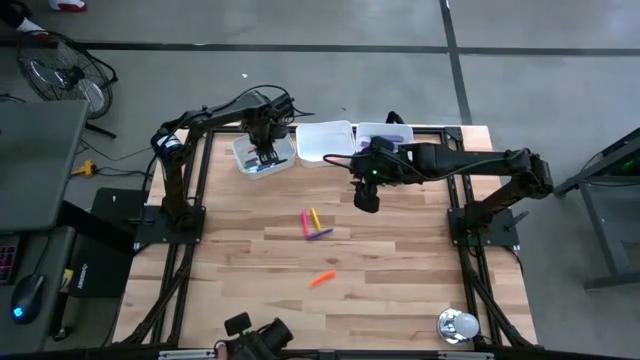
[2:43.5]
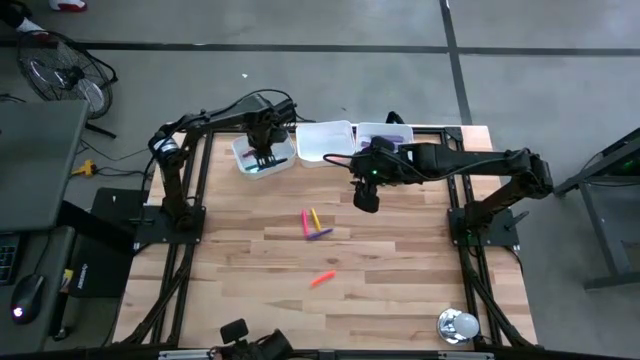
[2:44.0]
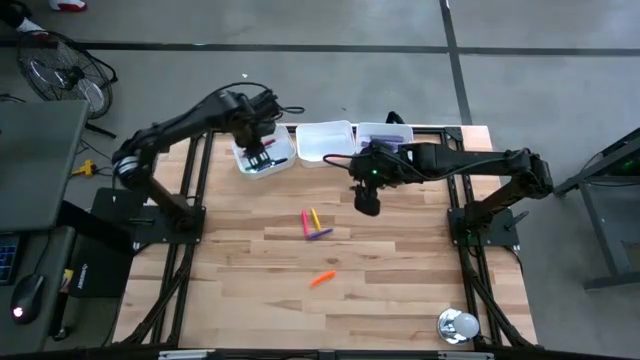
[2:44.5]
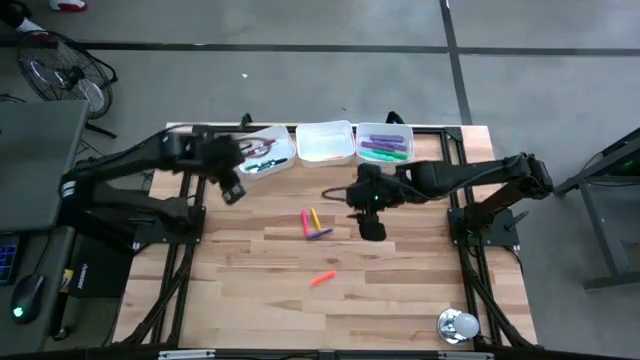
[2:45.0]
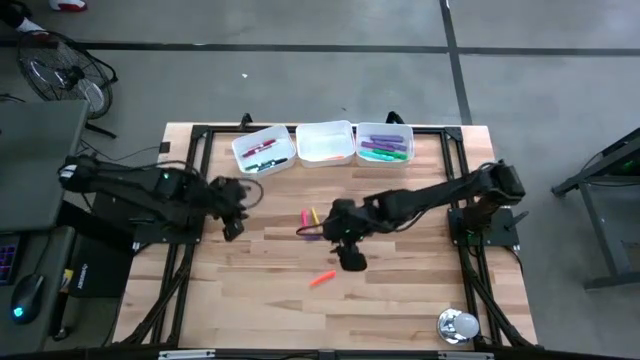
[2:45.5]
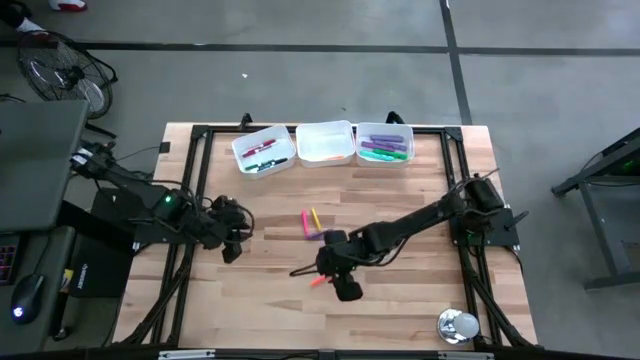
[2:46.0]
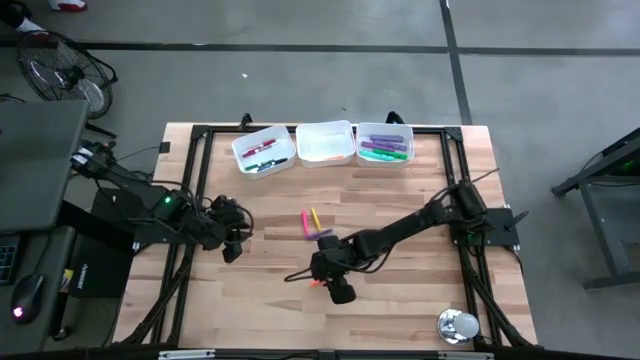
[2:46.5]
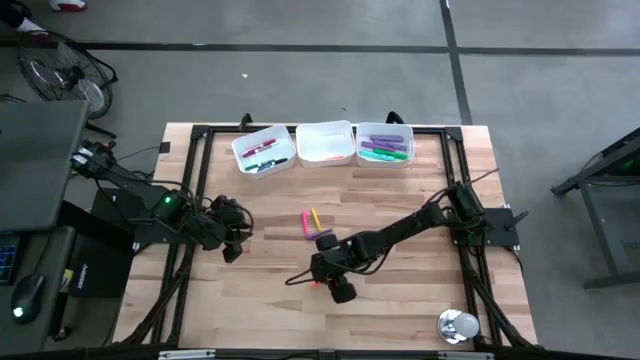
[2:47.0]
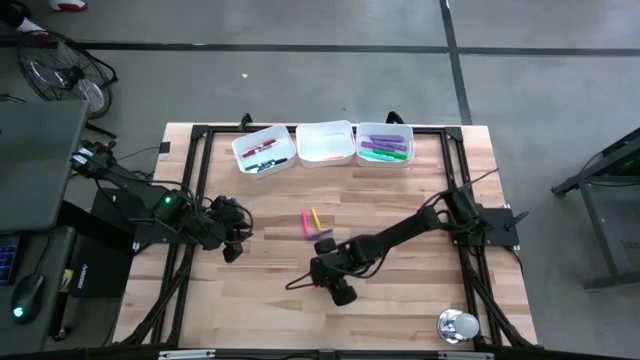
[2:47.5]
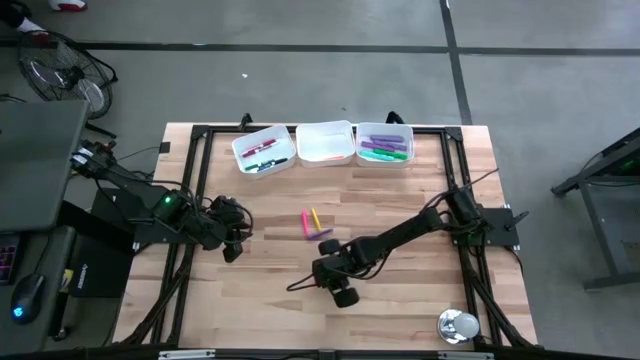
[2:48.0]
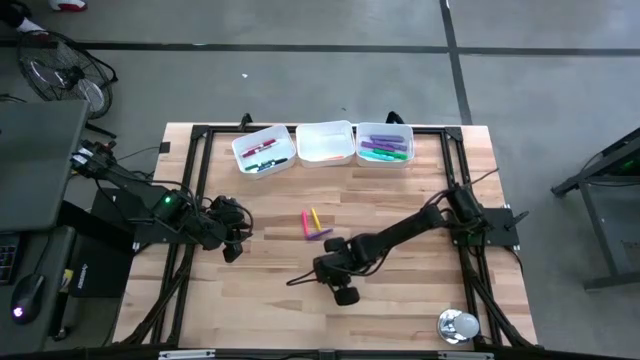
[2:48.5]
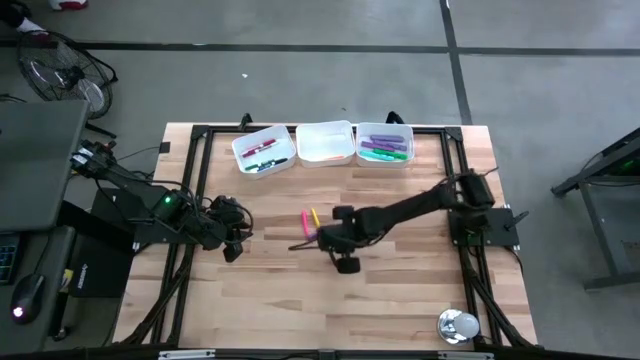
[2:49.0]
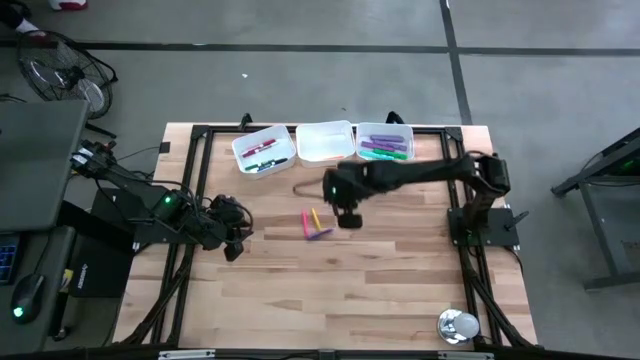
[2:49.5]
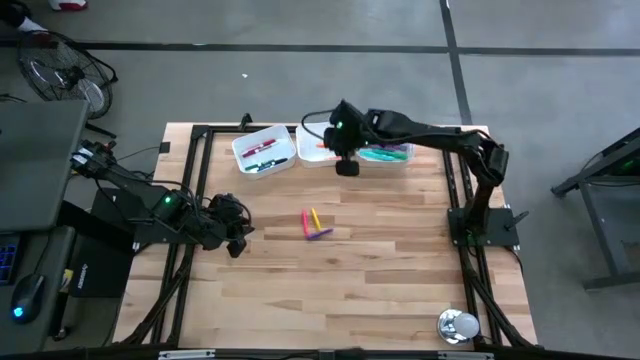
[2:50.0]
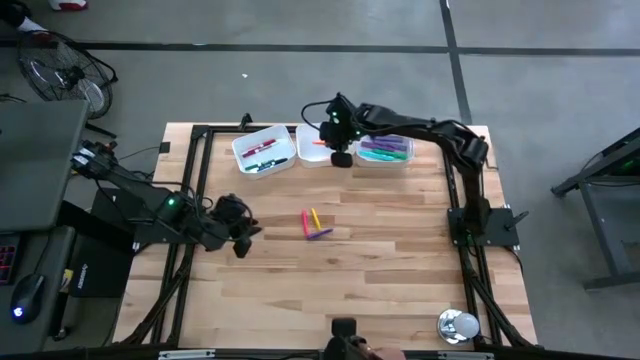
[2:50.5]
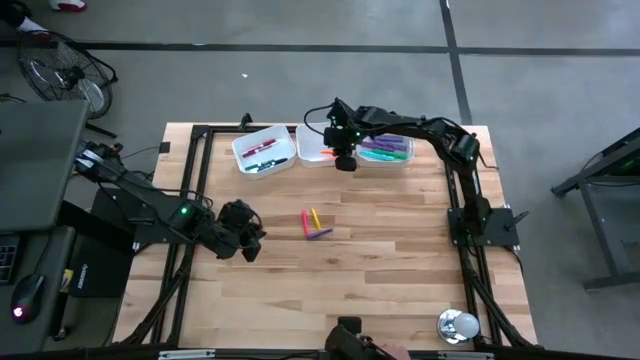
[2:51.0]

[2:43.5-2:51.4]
Task: Pick & Place Markers
Put the orange pen into the middle white bin

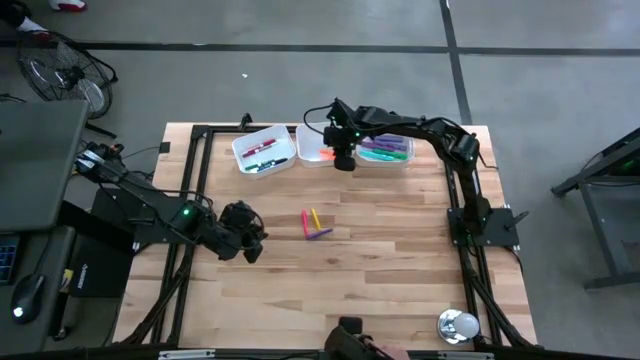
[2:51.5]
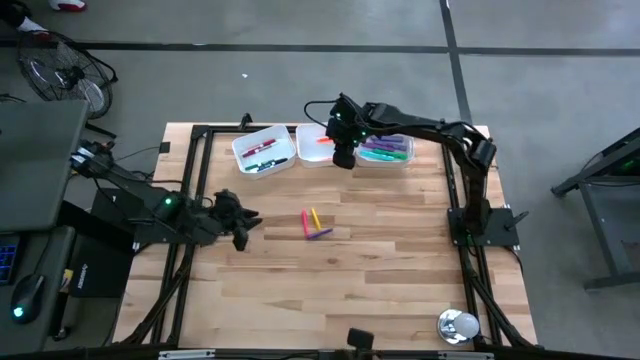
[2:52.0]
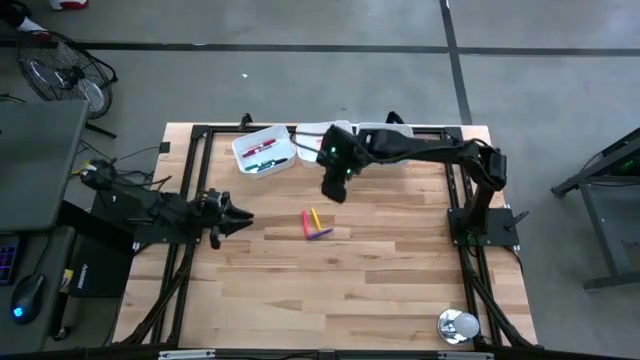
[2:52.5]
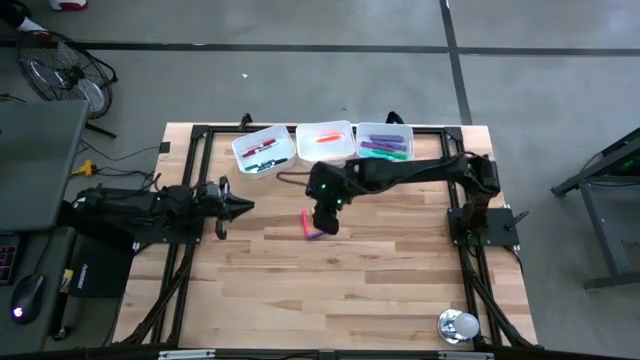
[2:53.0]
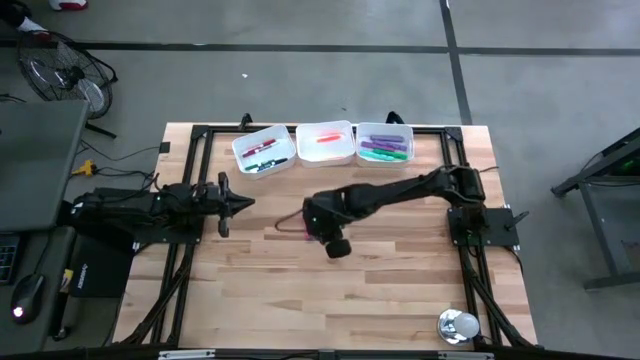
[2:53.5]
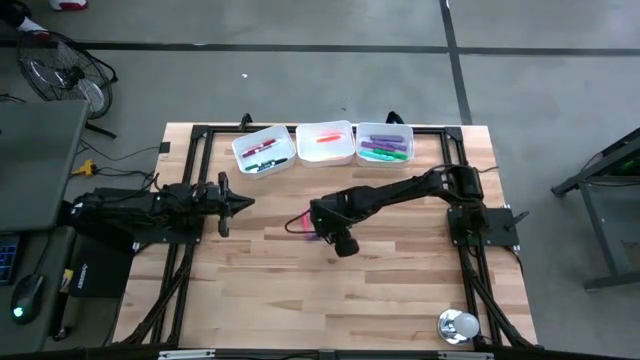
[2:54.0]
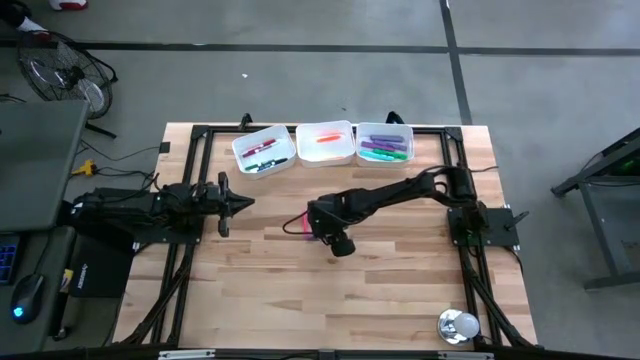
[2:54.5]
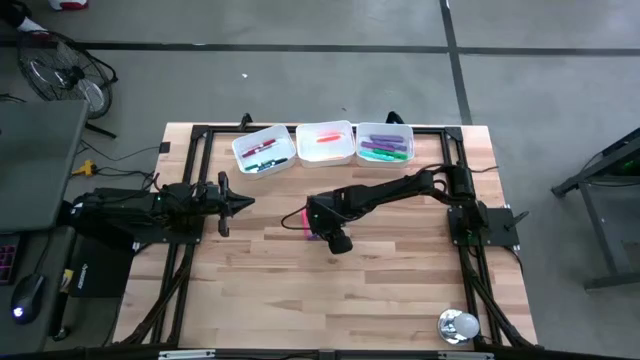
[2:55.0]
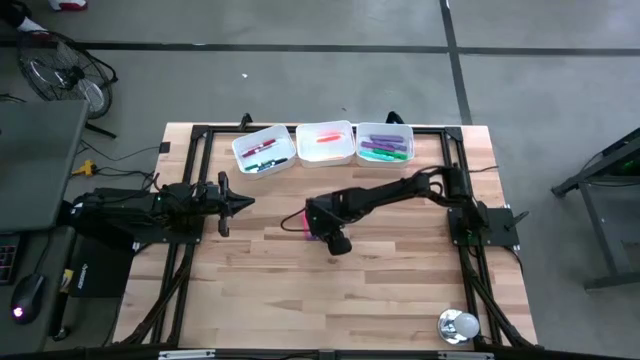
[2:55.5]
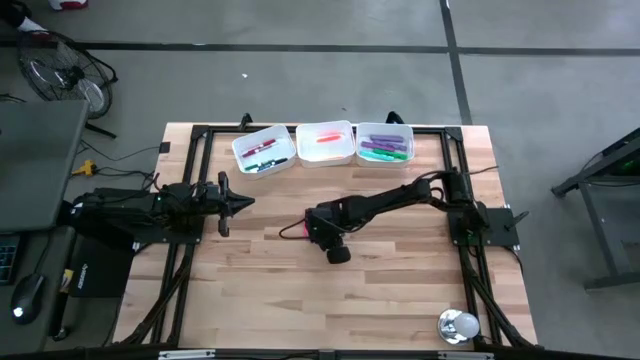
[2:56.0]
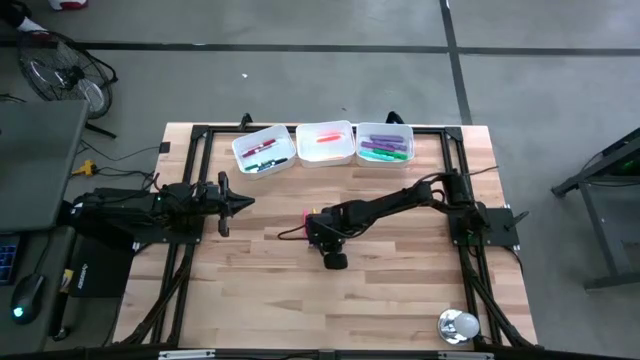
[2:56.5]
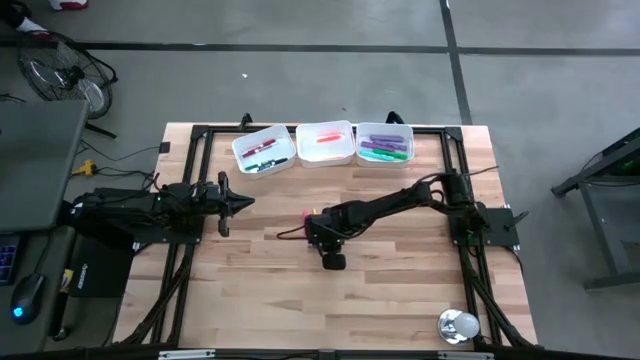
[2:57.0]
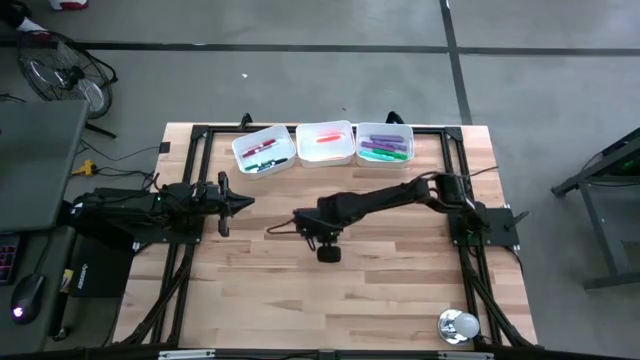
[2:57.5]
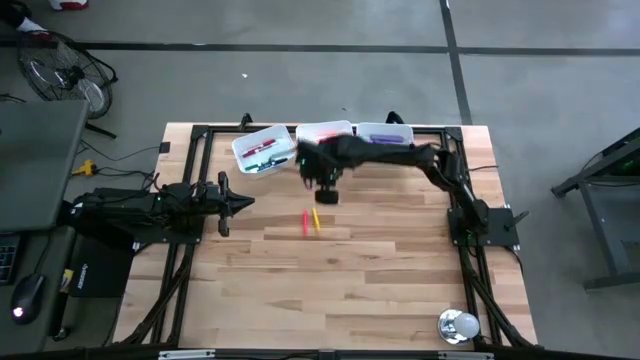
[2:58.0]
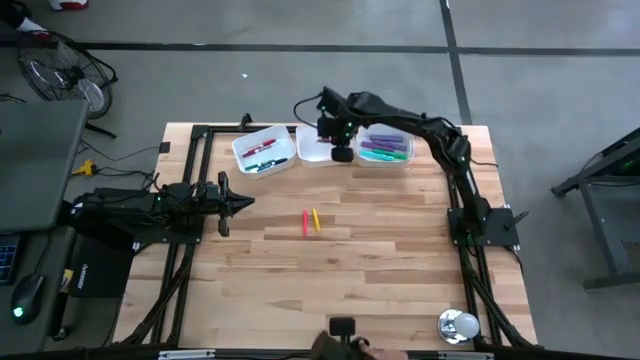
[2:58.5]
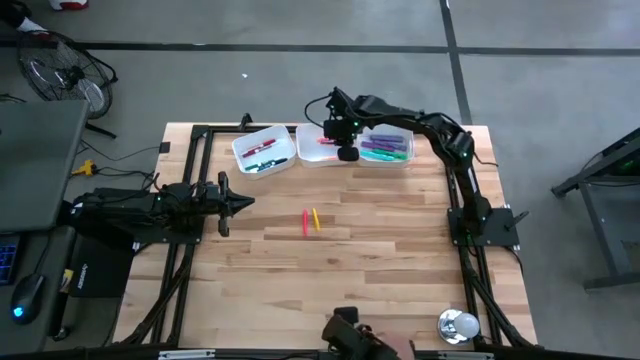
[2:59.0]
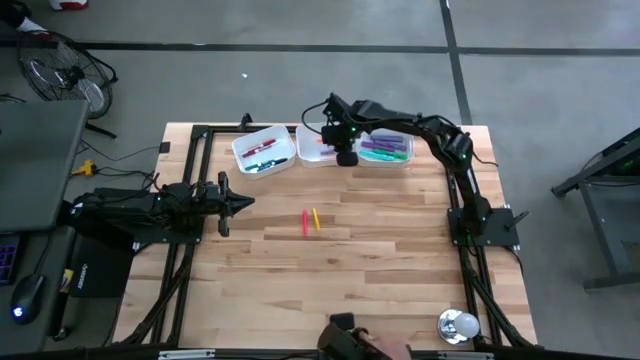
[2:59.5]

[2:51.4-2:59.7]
Put the violet pen into the middle white bin

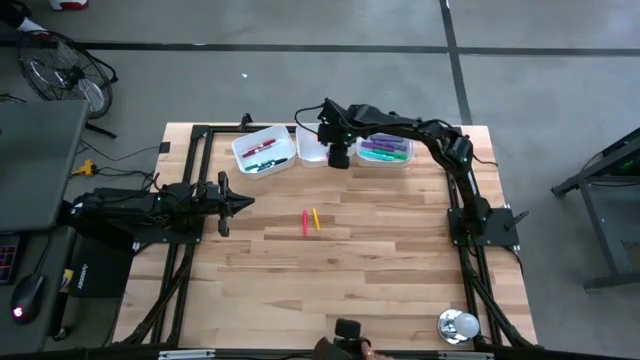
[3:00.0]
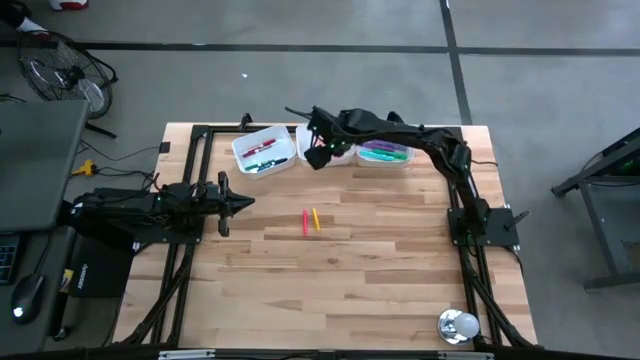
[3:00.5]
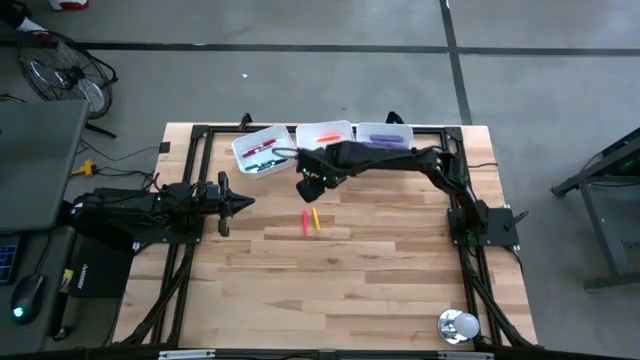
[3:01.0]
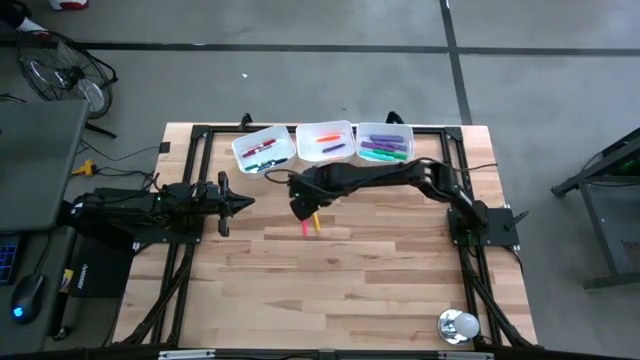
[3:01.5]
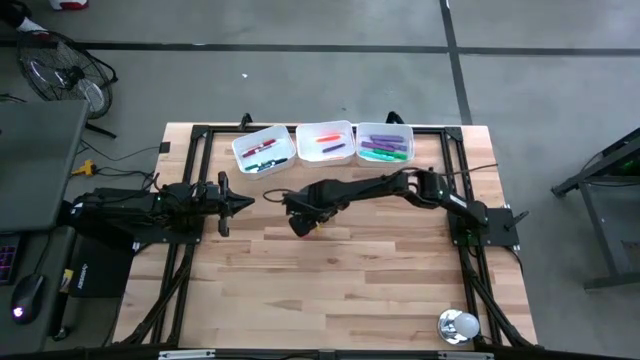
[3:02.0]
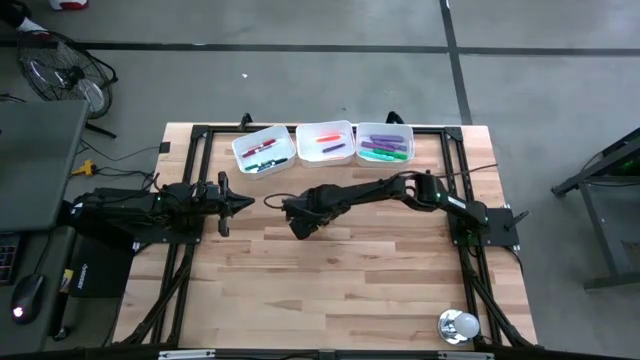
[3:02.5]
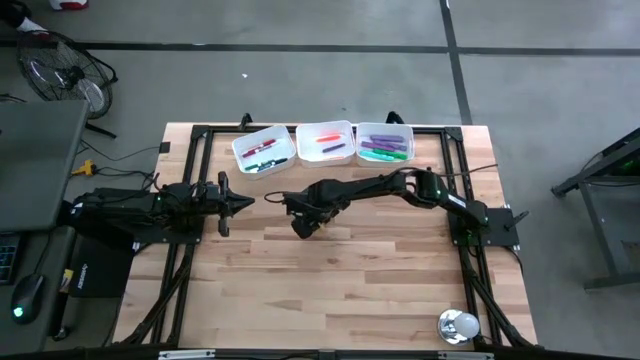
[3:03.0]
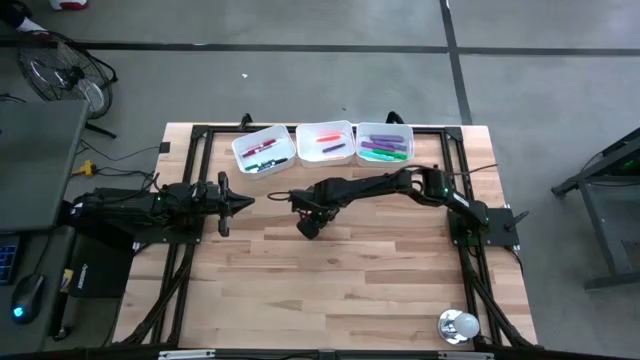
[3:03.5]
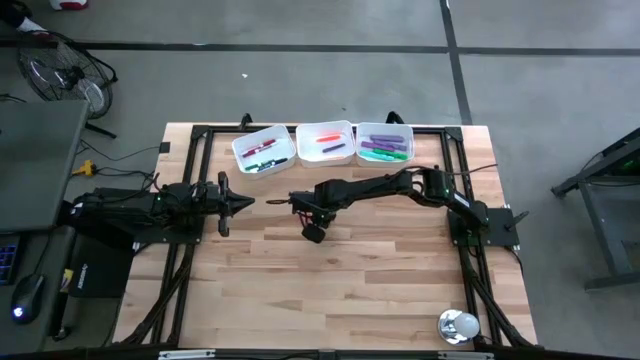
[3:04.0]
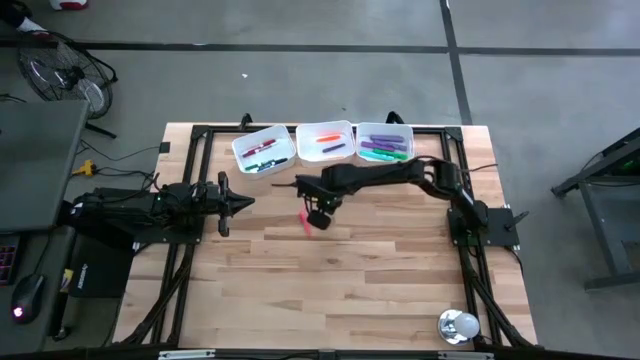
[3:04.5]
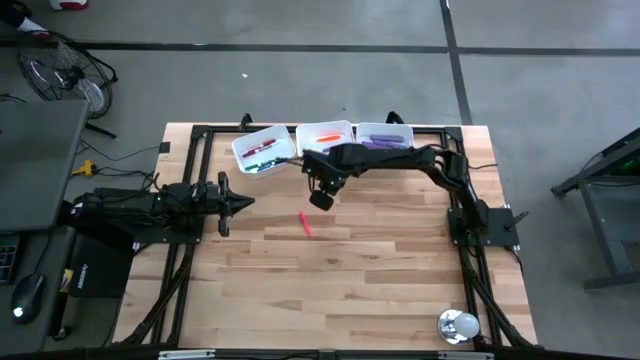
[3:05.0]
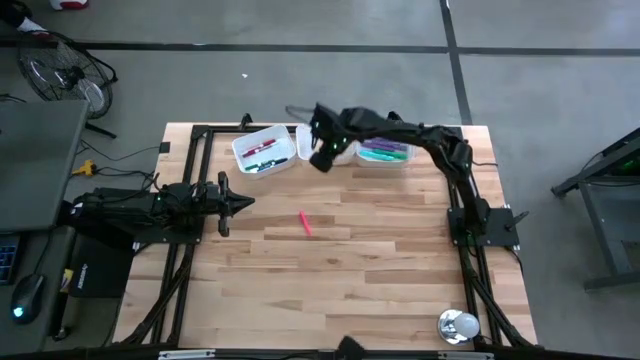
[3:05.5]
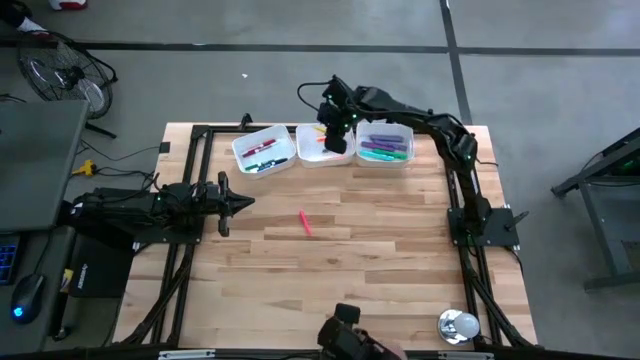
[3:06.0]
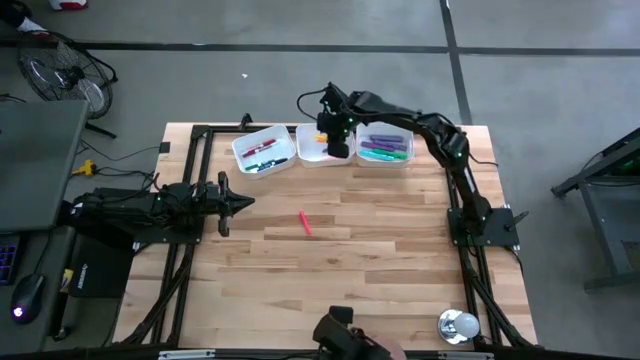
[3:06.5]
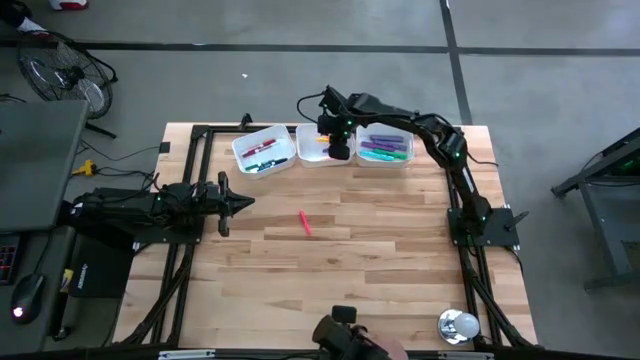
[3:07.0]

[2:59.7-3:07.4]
Put the yellow pen into the middle white bin
